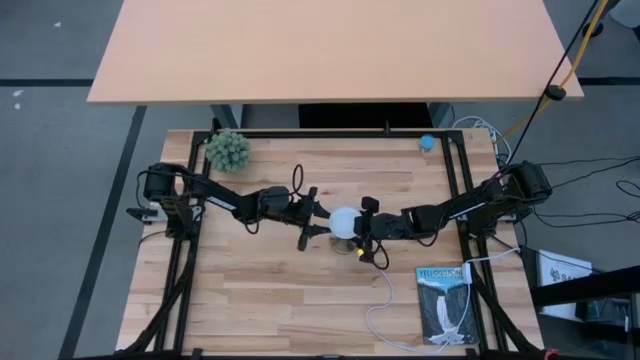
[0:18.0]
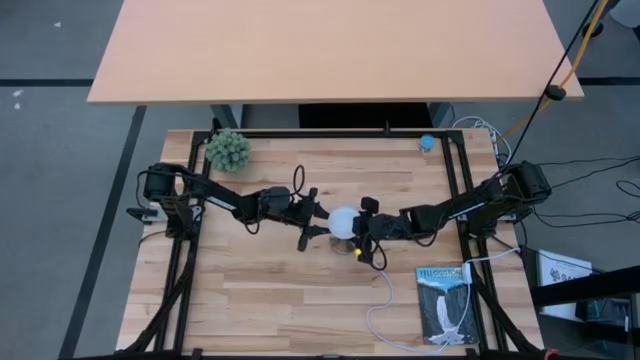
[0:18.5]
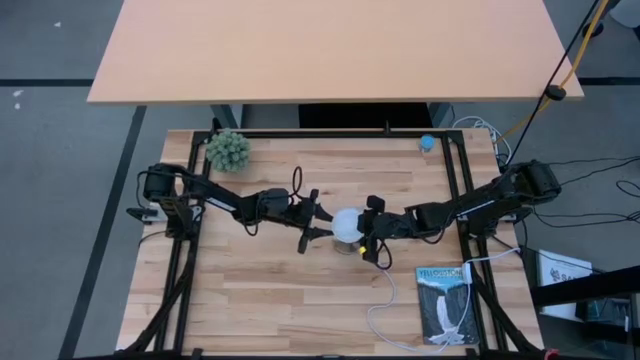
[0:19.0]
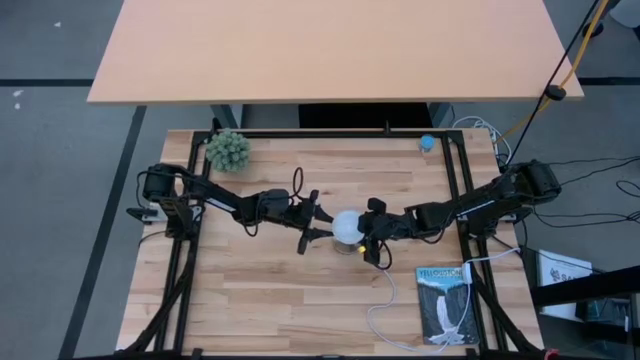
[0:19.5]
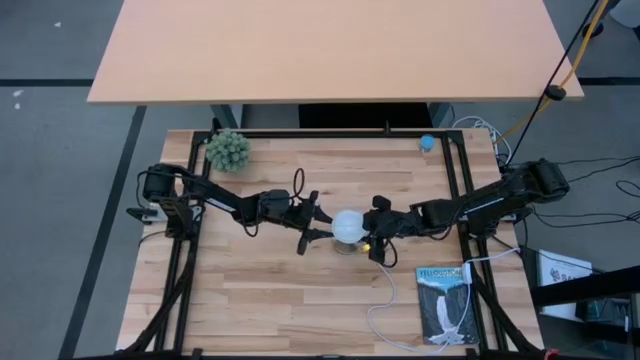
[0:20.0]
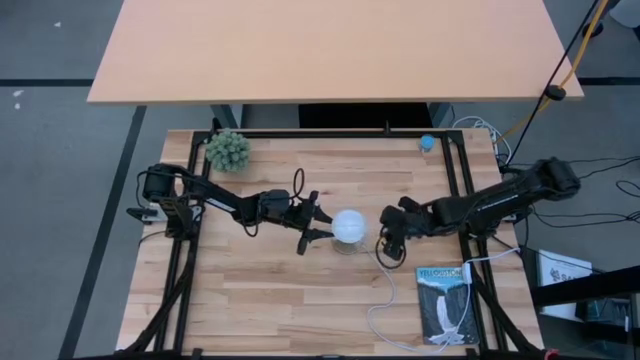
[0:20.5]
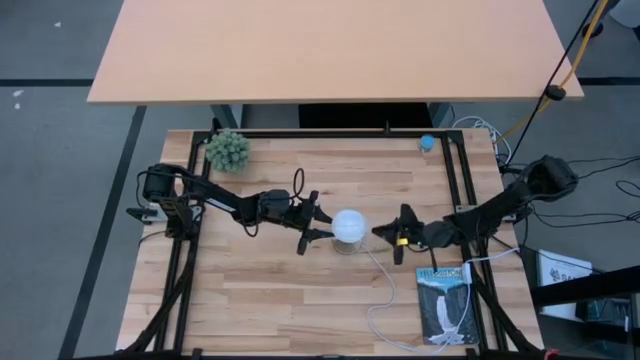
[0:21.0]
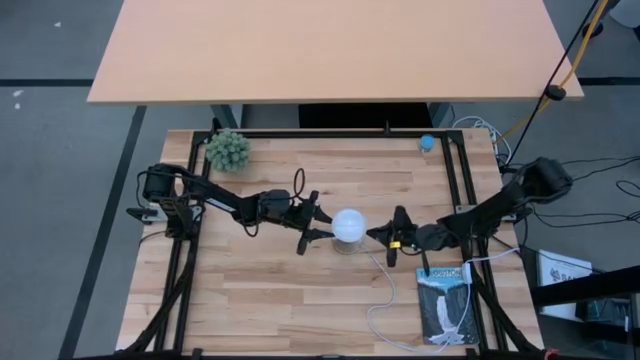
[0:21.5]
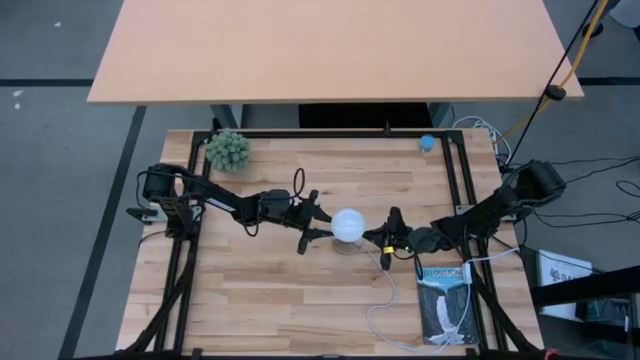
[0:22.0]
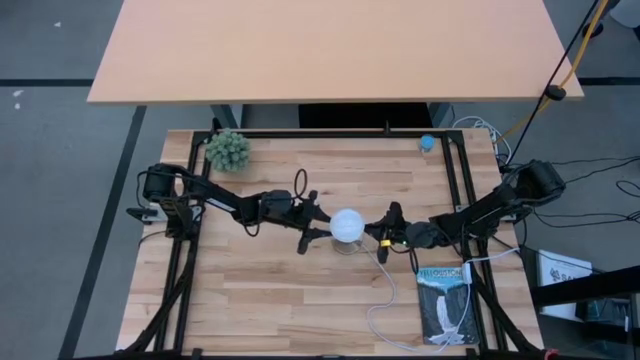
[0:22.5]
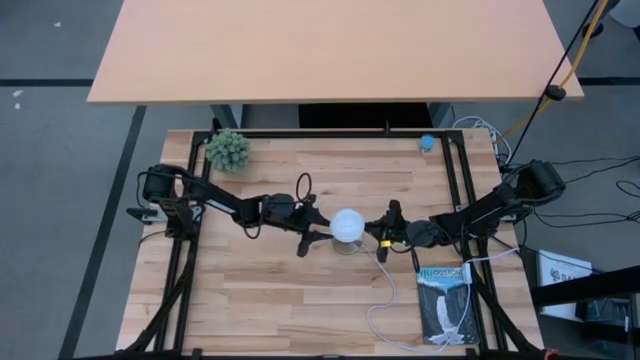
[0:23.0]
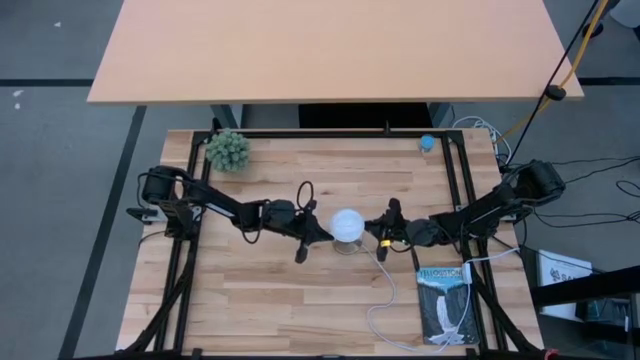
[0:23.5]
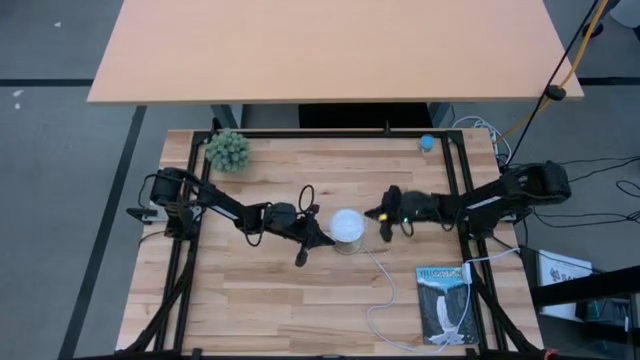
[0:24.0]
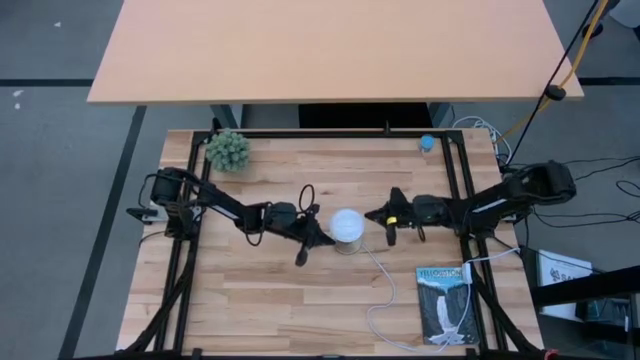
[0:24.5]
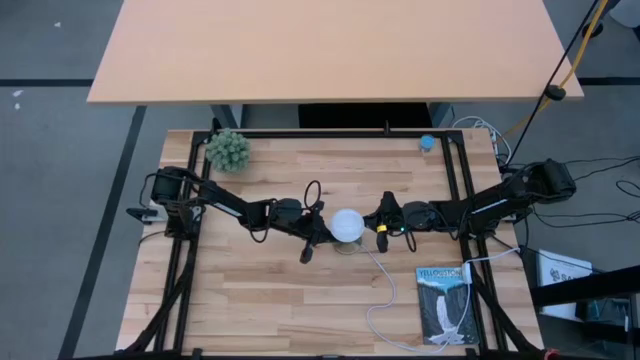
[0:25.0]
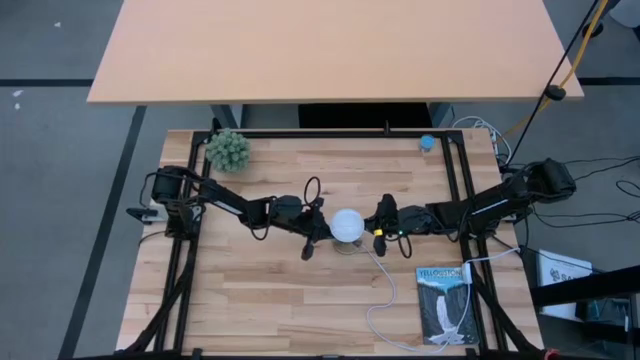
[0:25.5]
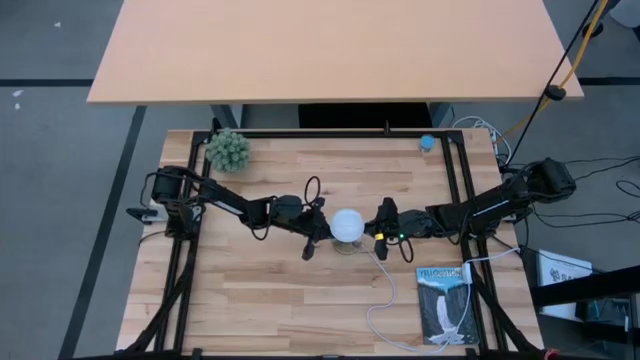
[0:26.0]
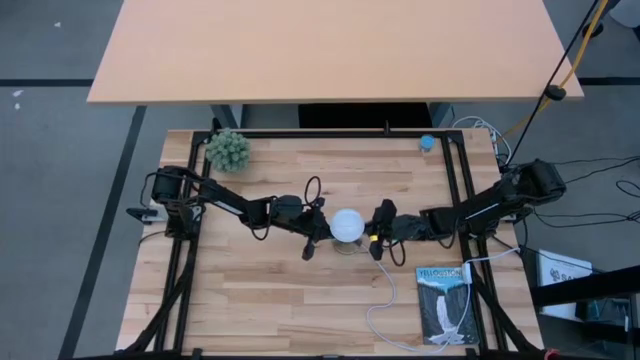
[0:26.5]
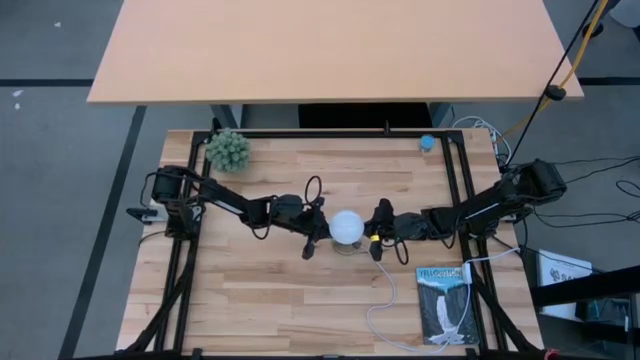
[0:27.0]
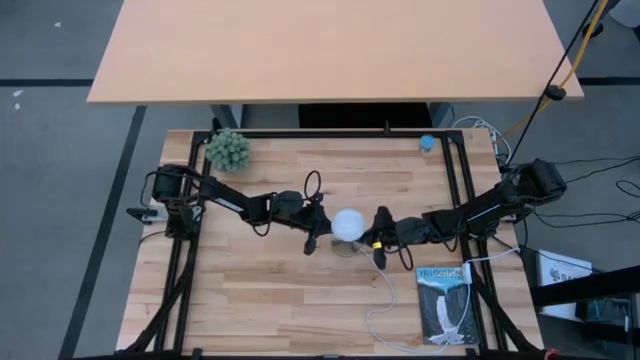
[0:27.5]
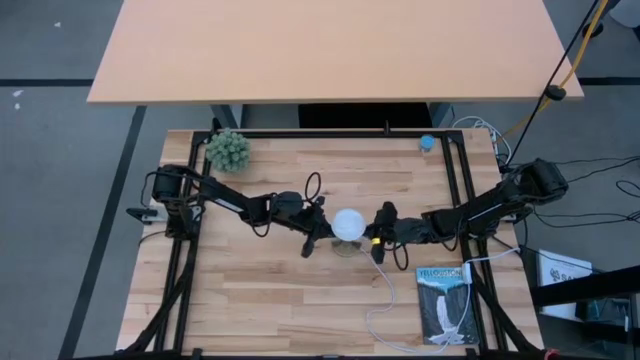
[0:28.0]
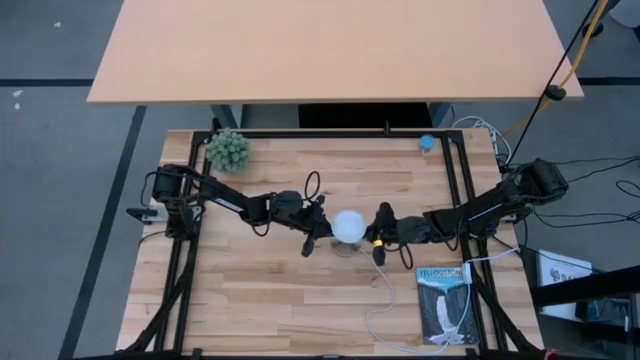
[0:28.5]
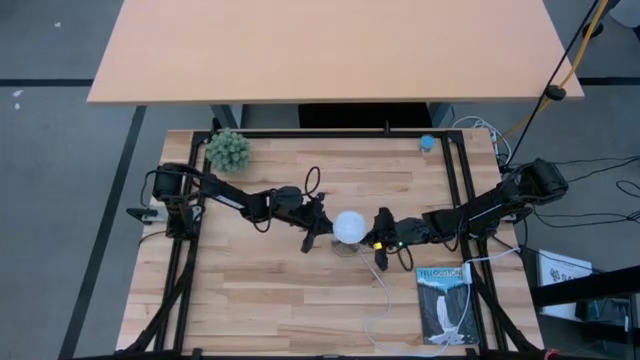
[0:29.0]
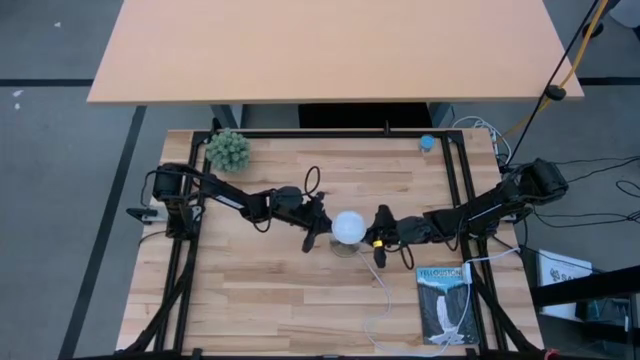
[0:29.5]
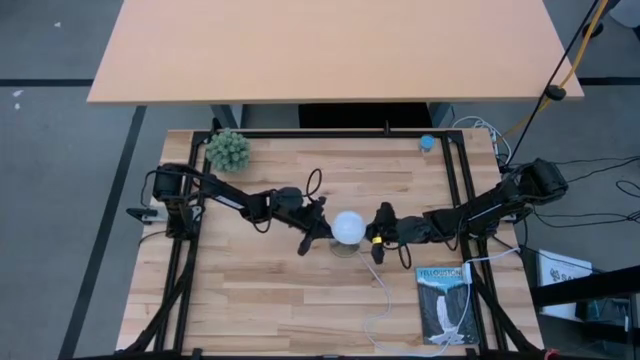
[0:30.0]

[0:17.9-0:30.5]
Task: Screw lightbulb
Insert the light bulb into the lamp

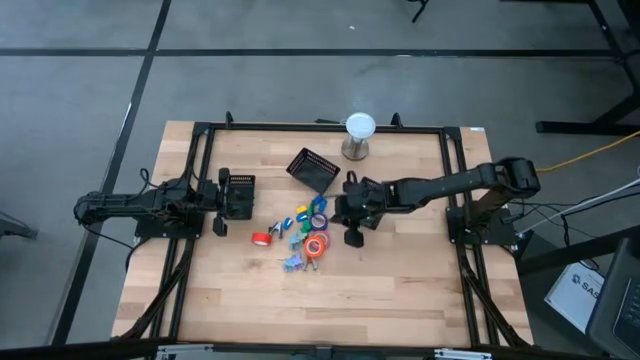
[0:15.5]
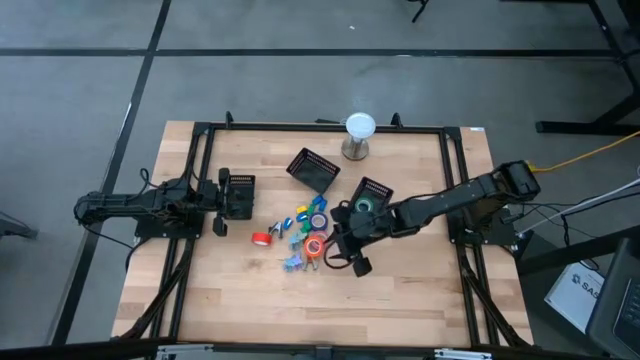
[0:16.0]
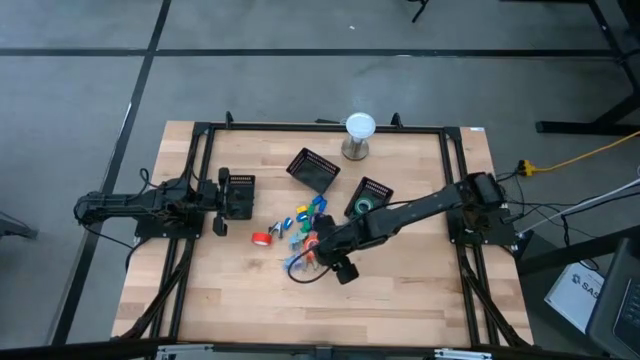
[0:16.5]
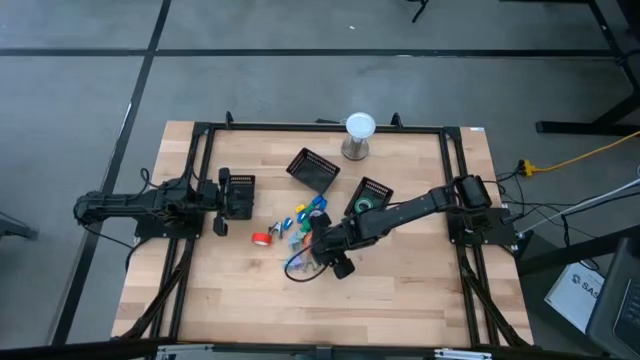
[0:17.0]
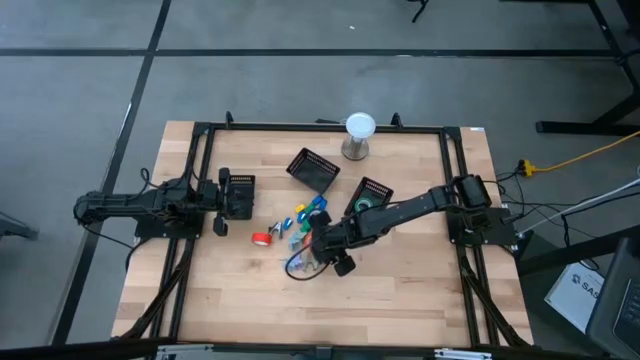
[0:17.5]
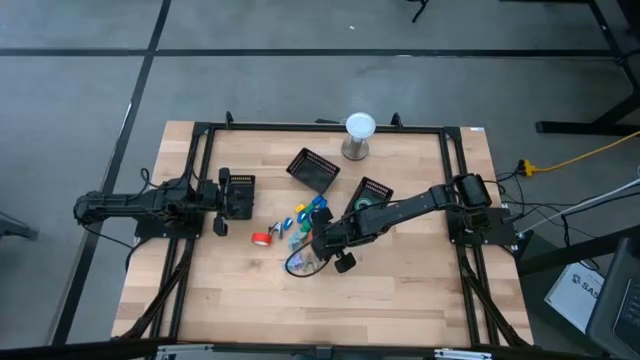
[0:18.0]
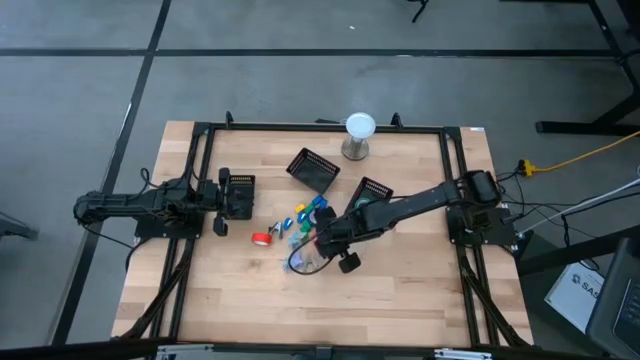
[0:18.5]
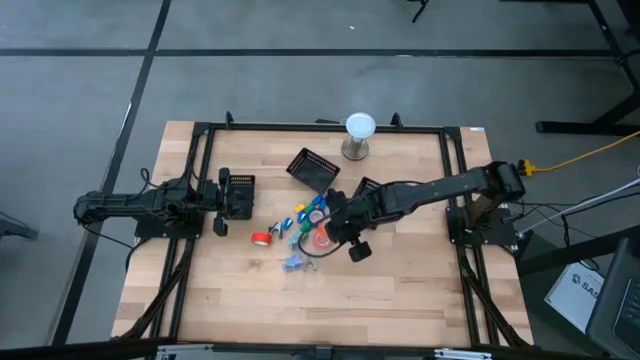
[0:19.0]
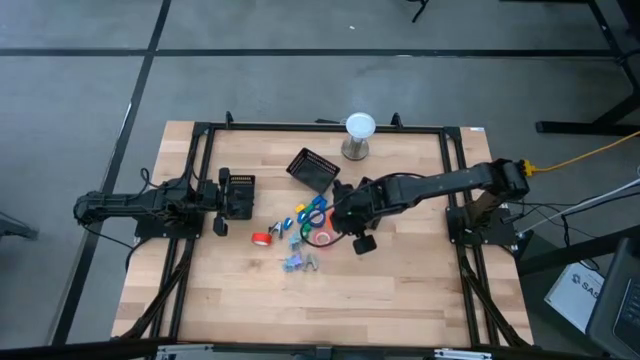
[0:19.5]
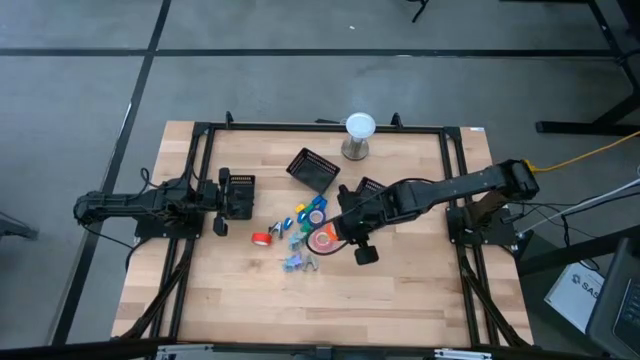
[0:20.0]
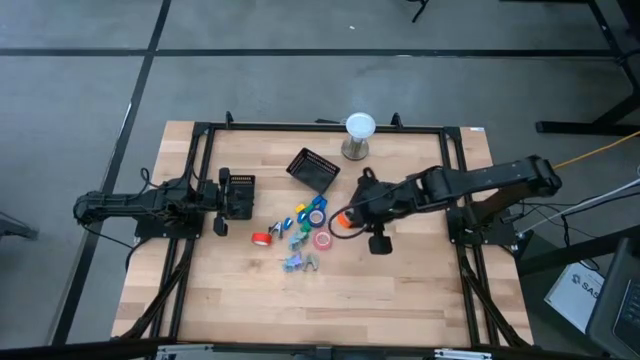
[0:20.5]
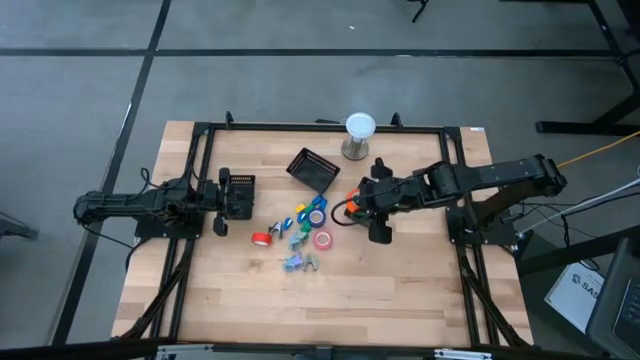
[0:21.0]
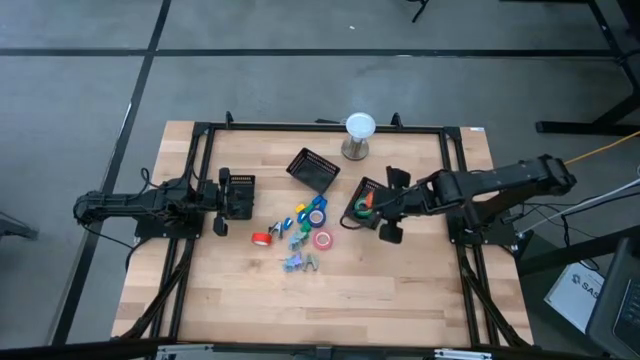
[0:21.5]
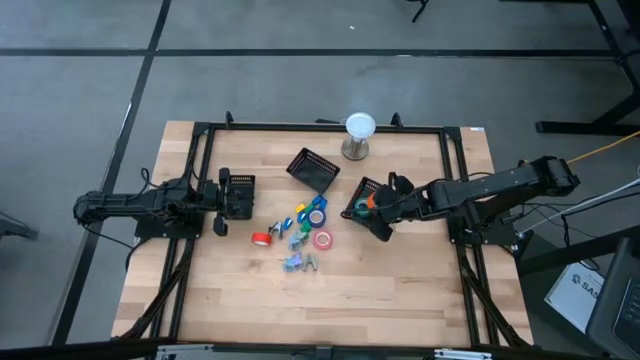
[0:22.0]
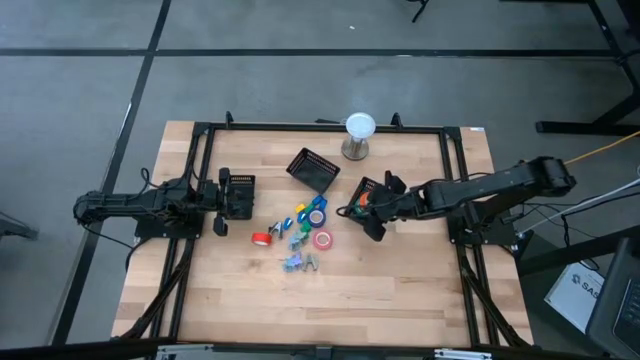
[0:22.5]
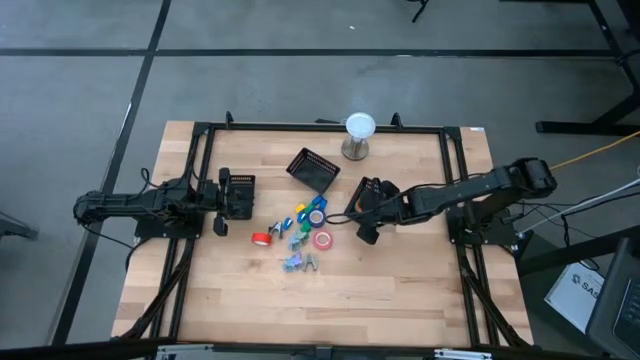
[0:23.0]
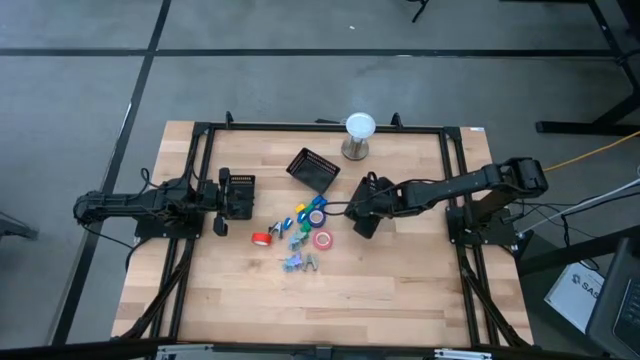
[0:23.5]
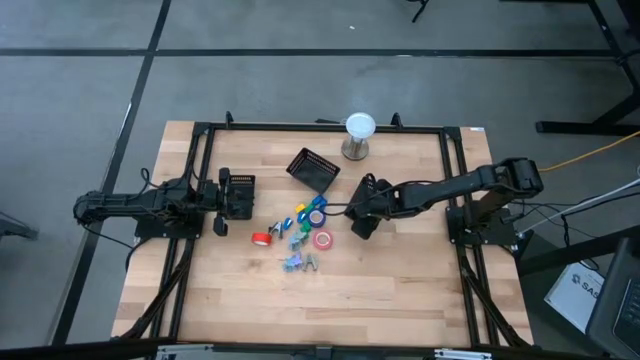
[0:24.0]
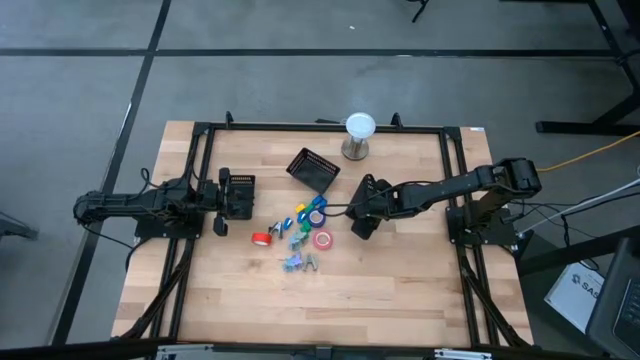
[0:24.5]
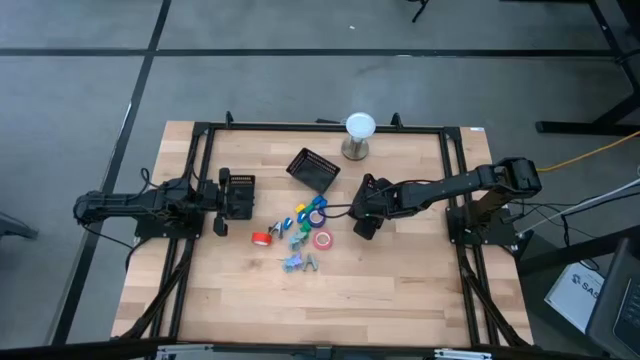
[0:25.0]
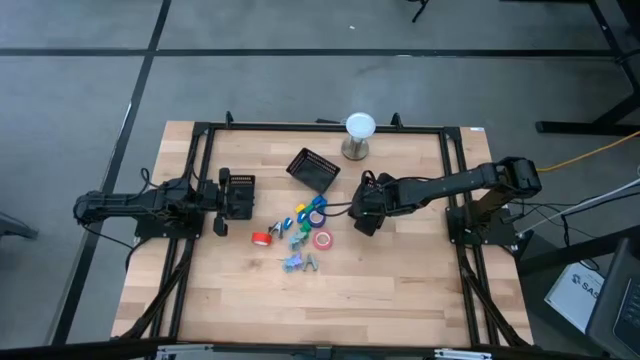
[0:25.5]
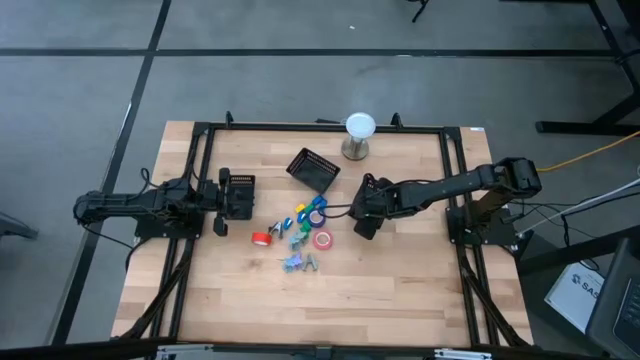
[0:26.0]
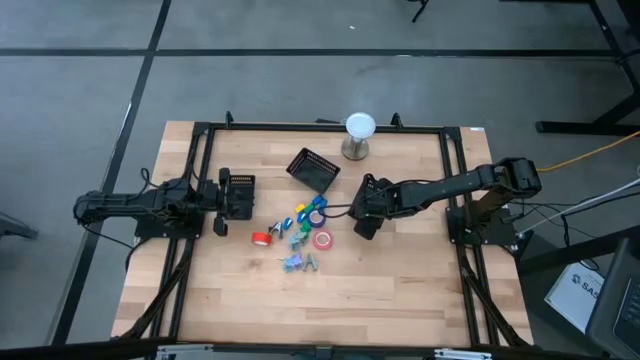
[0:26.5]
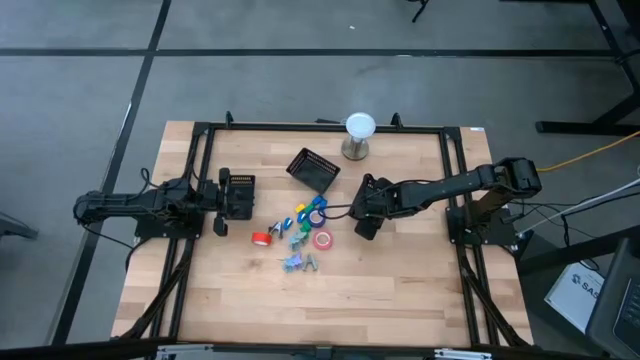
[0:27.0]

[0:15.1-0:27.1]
Task: Pick and place Stapler, Stapler remover, tape
Put the orange tape into the right black bin
